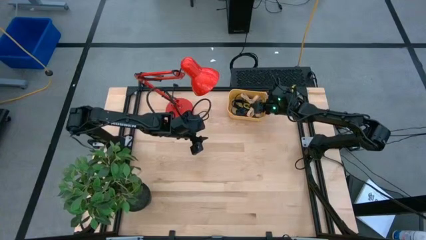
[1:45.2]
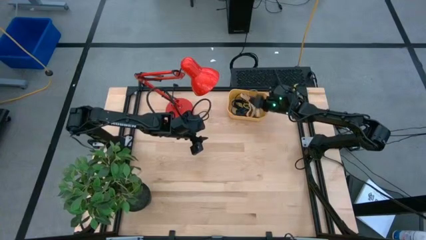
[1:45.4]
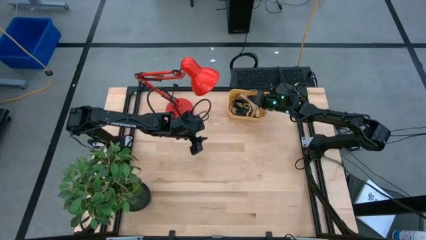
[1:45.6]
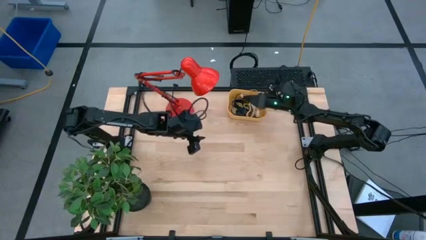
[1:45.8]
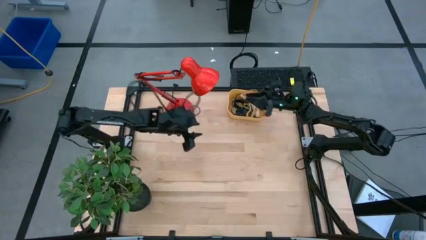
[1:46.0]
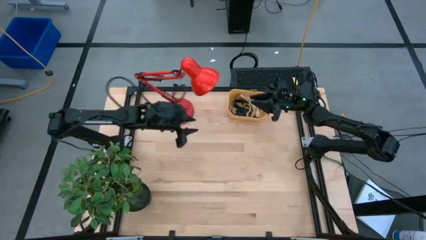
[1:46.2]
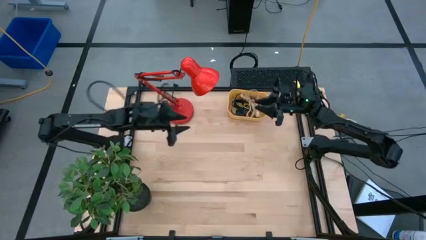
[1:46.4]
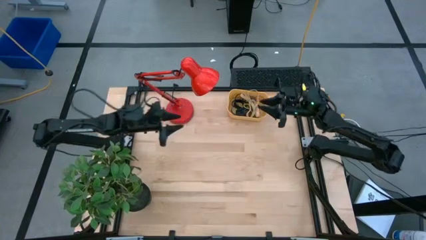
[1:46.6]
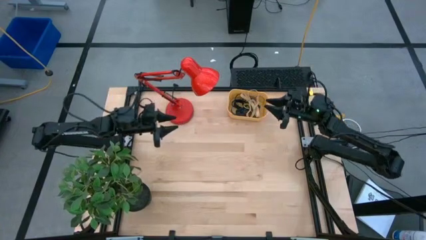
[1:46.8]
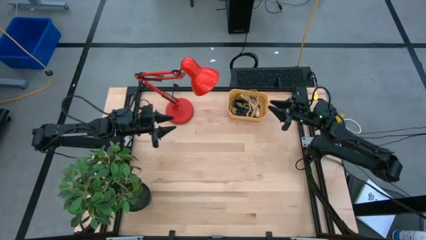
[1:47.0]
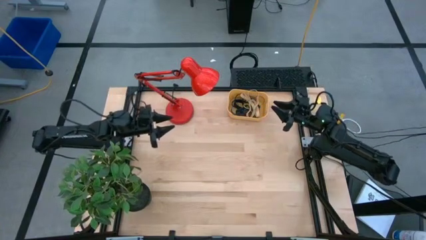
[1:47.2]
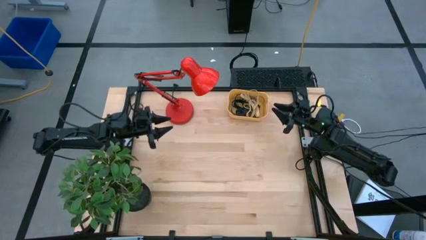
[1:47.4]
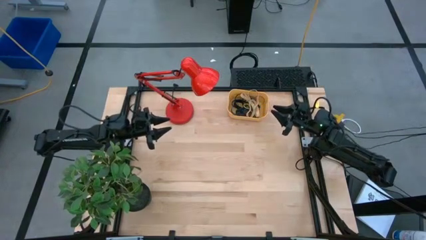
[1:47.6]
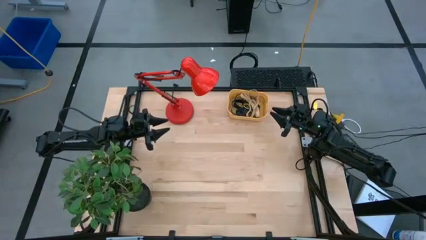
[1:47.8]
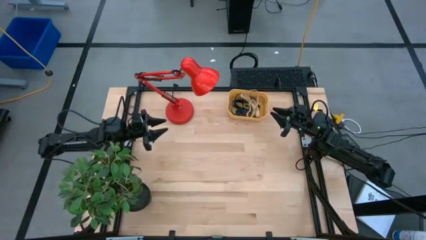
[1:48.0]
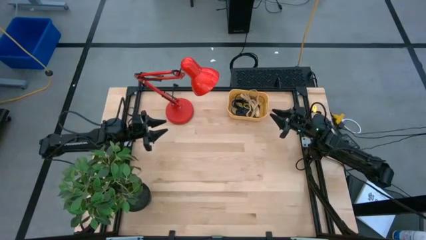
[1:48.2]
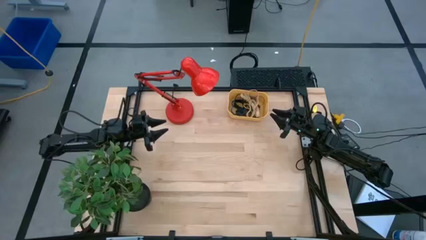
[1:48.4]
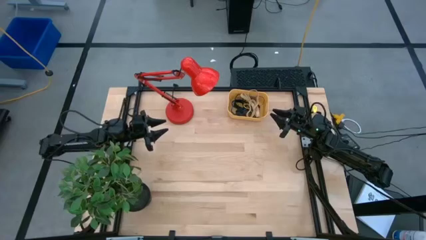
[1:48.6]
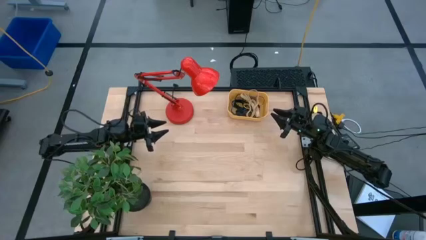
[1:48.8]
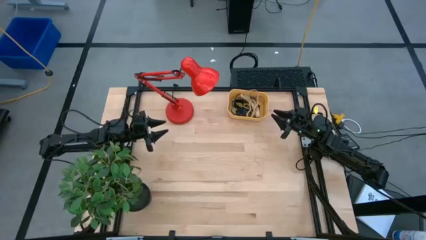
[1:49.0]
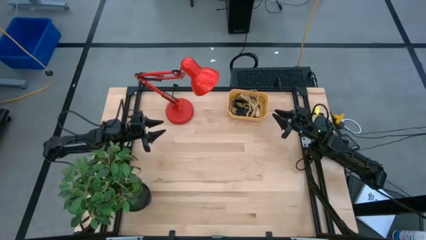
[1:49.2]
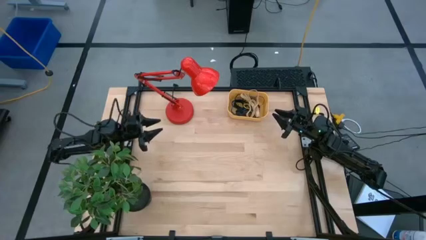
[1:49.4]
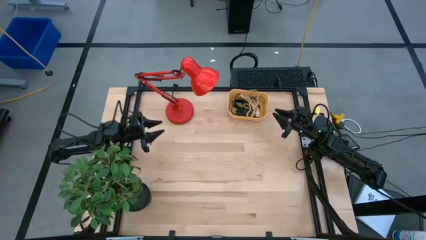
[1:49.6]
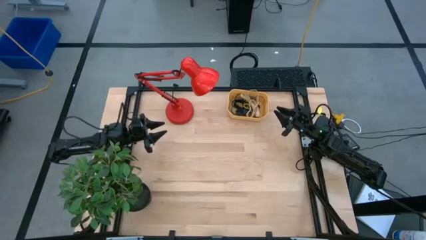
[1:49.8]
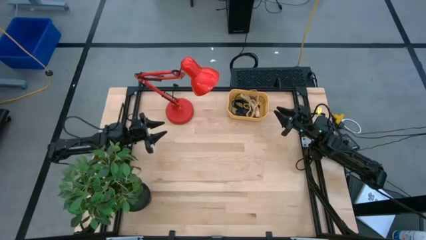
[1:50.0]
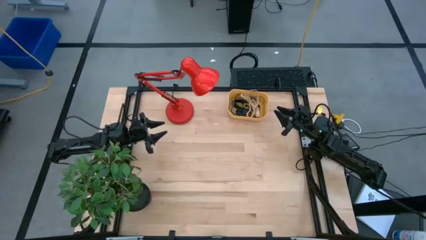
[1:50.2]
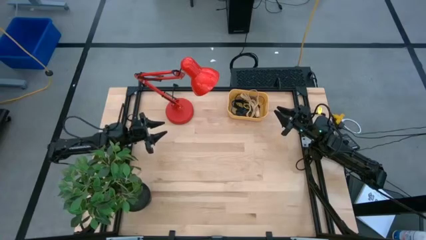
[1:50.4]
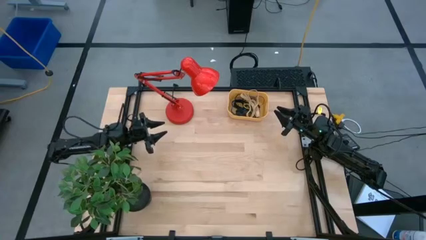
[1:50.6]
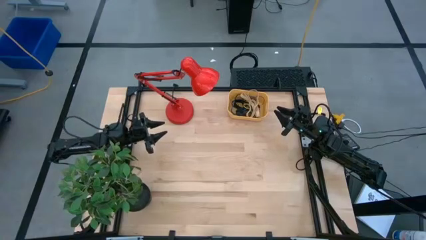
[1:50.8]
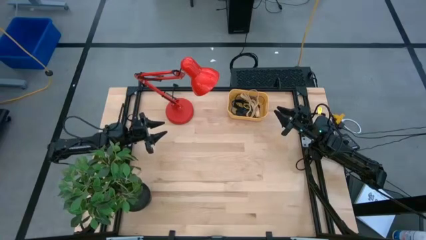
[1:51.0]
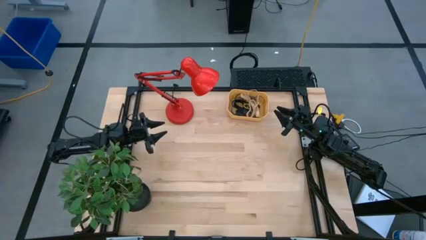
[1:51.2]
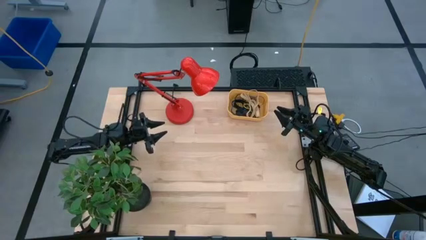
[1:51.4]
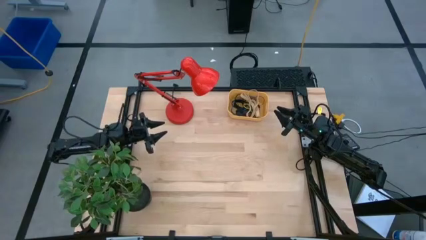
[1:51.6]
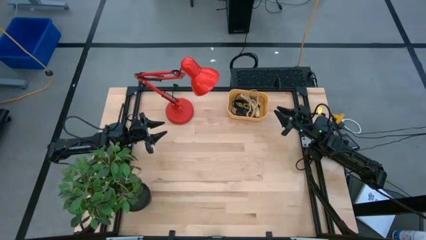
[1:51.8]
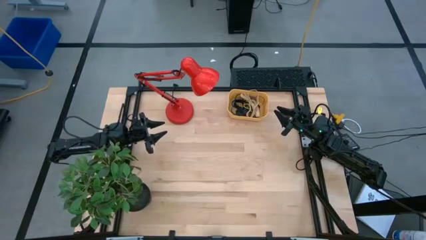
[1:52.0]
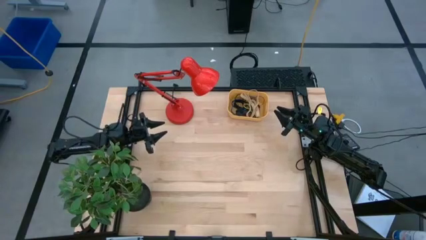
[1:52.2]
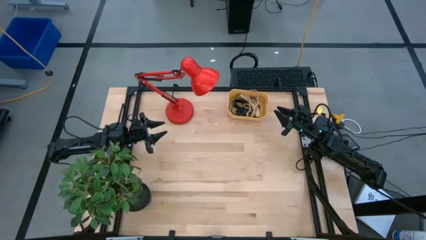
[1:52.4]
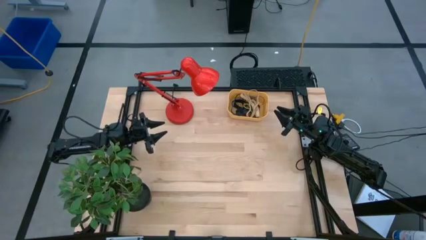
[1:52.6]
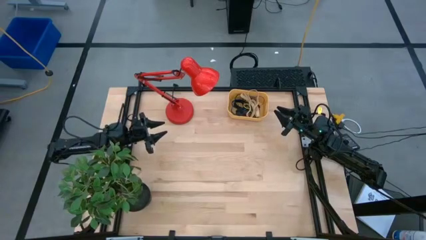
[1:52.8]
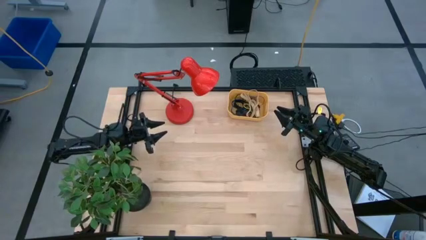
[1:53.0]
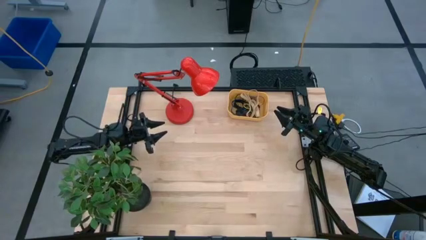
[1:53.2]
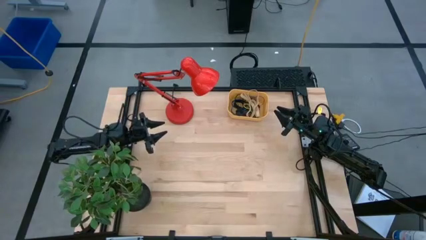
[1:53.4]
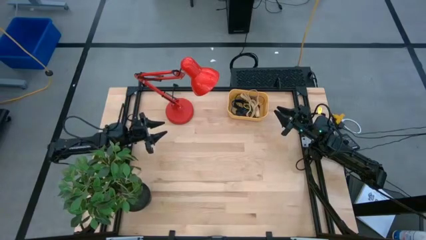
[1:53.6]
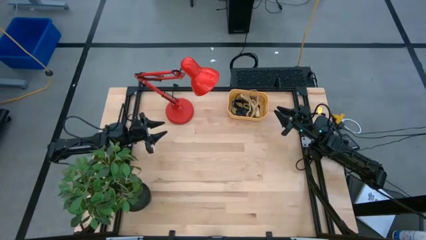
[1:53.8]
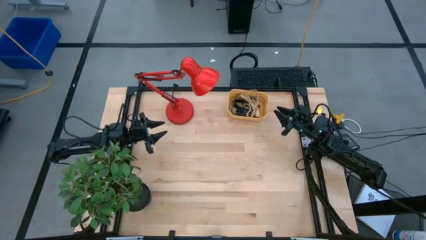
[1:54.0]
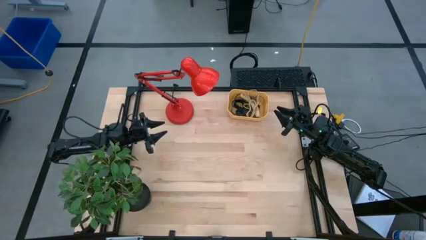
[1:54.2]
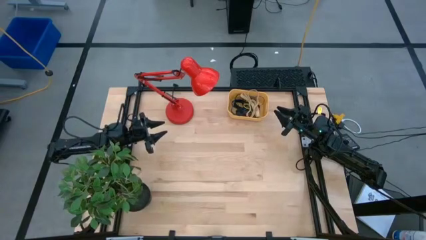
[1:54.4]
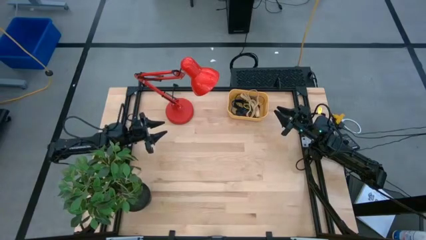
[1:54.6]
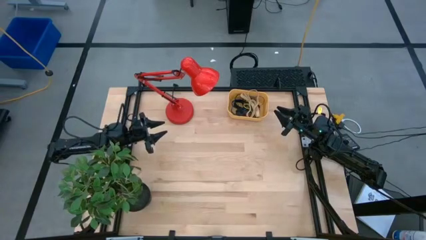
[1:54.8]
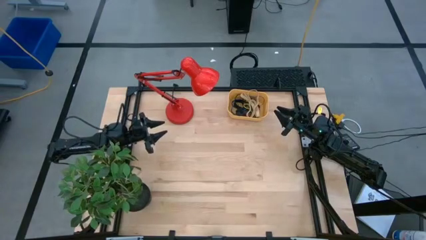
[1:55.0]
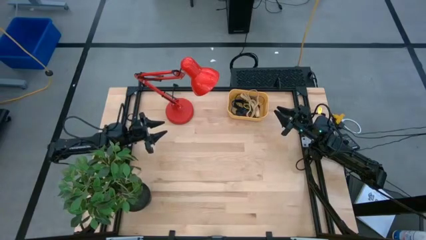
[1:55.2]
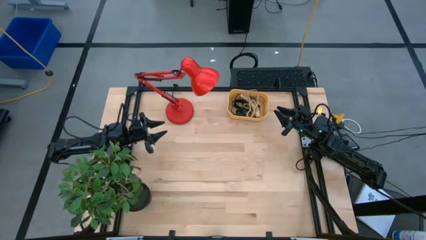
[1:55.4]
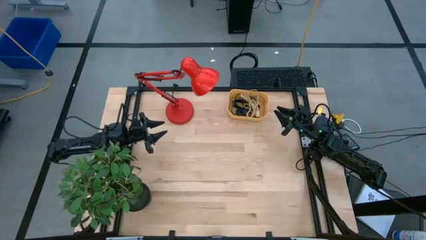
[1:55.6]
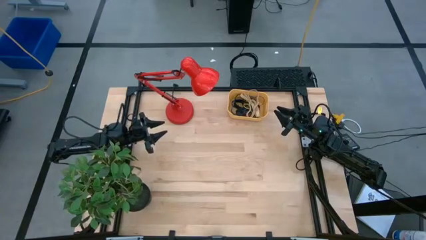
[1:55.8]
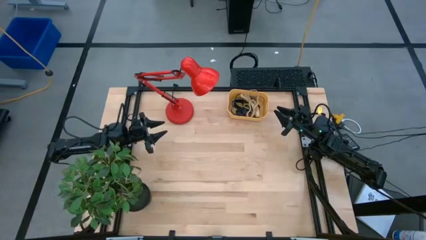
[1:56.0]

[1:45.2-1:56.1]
Task: Pick and place rubber bands into bin
Return to Home Position

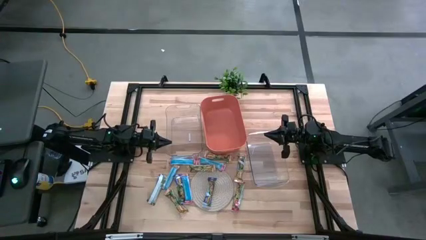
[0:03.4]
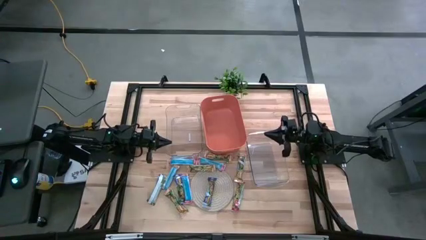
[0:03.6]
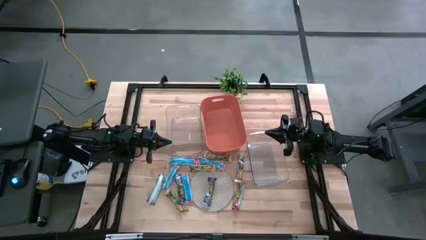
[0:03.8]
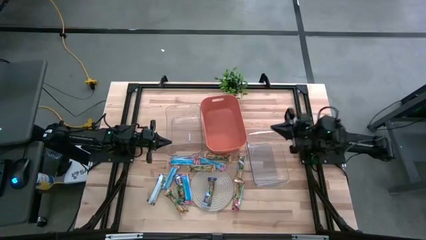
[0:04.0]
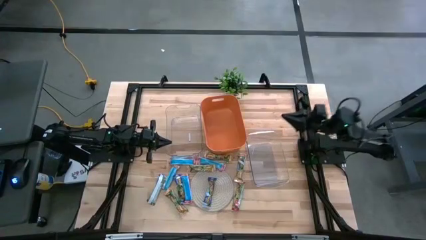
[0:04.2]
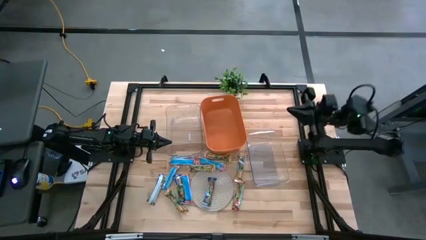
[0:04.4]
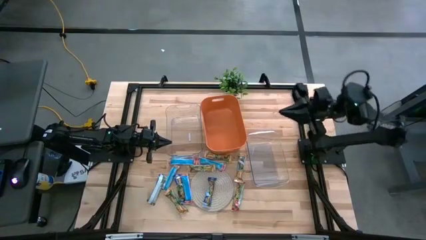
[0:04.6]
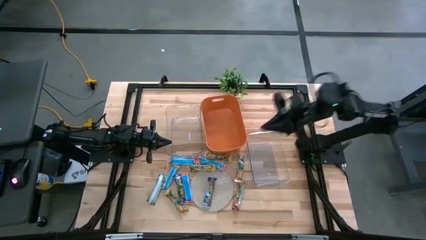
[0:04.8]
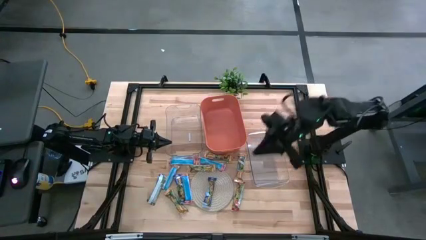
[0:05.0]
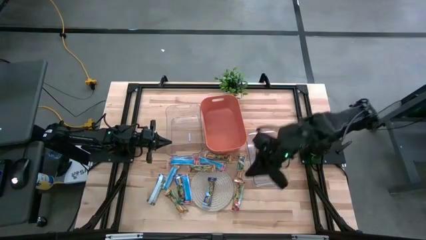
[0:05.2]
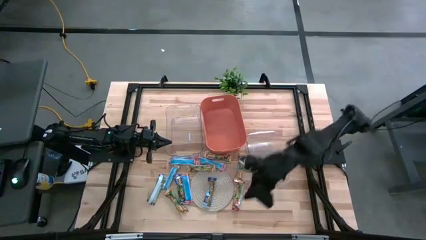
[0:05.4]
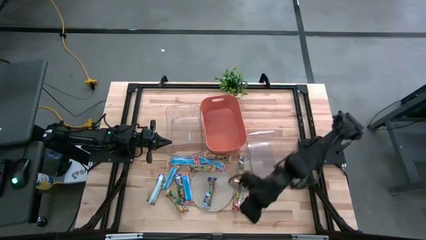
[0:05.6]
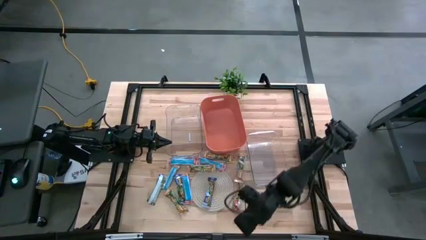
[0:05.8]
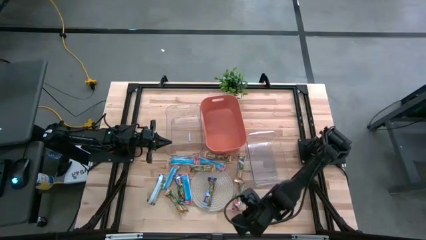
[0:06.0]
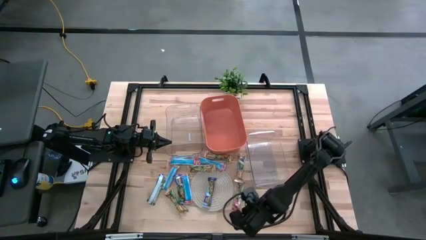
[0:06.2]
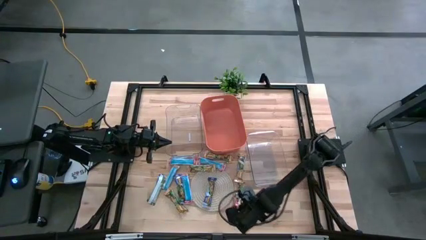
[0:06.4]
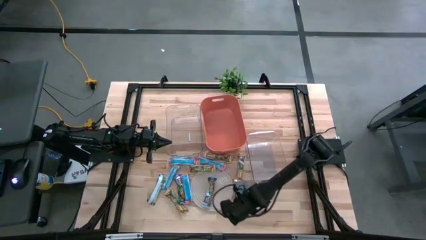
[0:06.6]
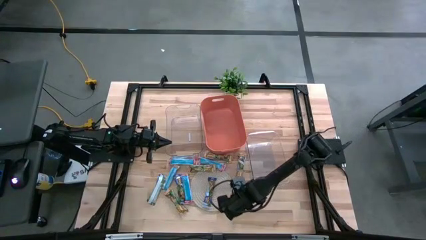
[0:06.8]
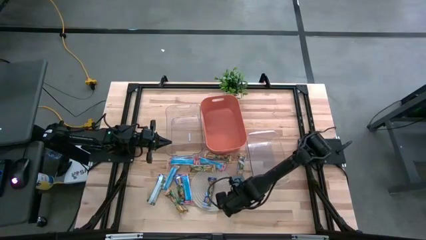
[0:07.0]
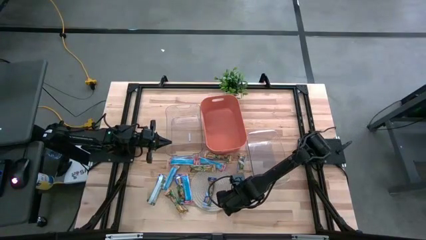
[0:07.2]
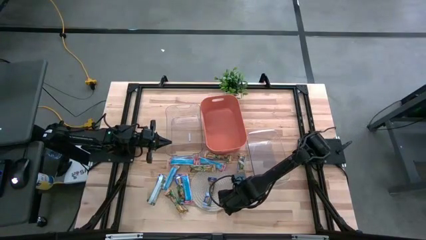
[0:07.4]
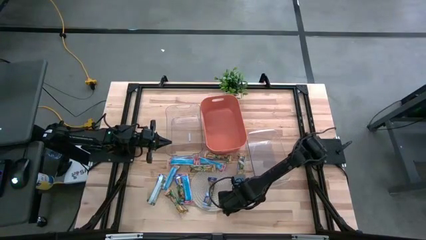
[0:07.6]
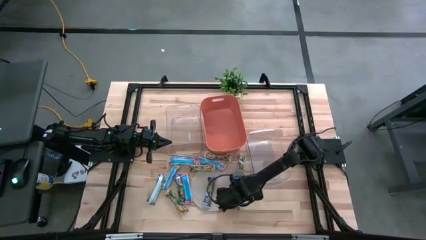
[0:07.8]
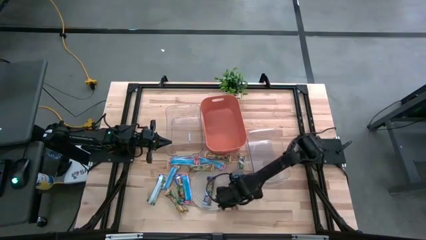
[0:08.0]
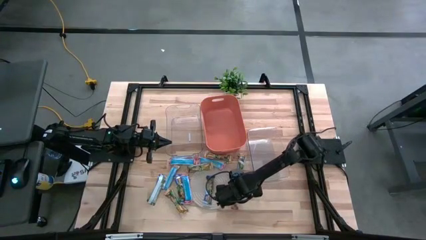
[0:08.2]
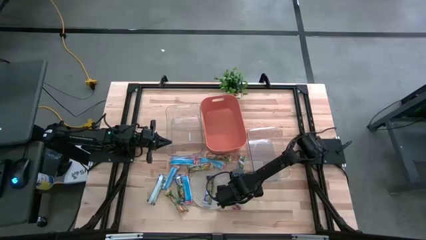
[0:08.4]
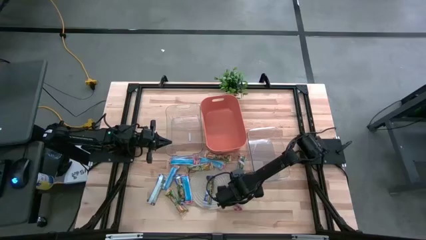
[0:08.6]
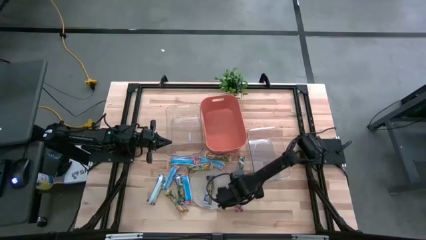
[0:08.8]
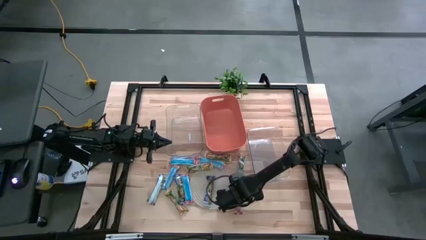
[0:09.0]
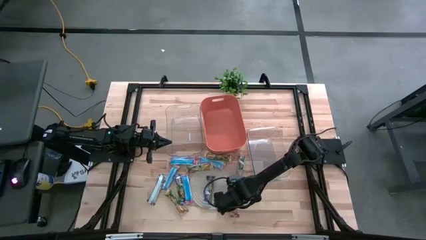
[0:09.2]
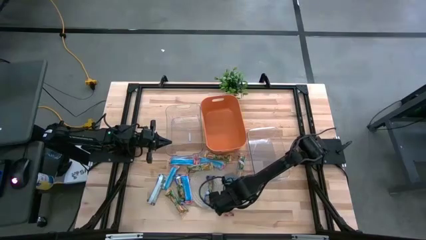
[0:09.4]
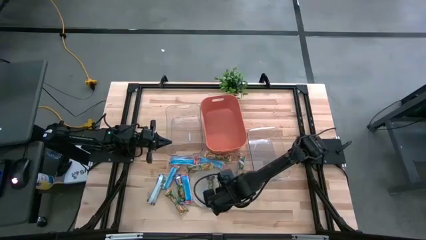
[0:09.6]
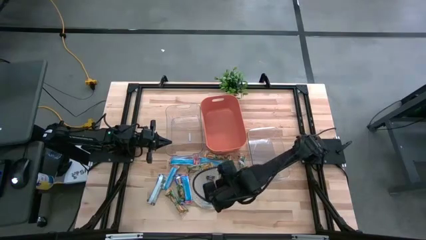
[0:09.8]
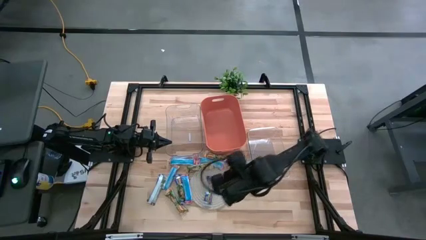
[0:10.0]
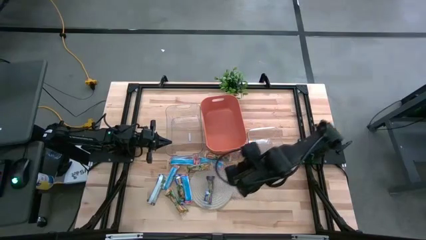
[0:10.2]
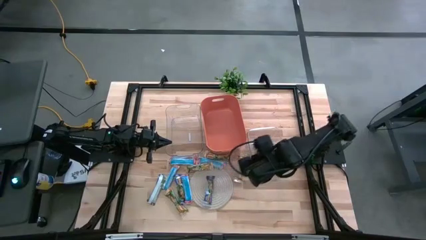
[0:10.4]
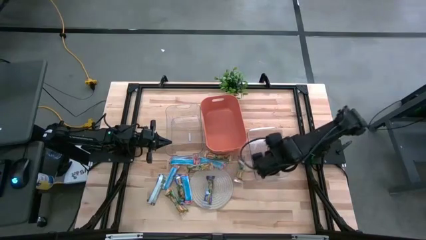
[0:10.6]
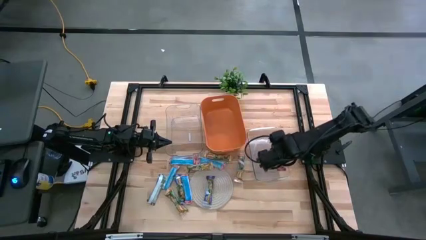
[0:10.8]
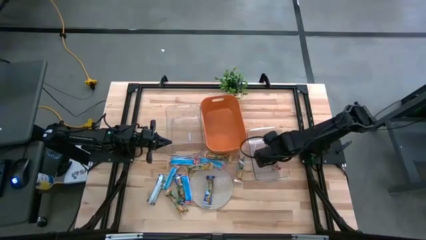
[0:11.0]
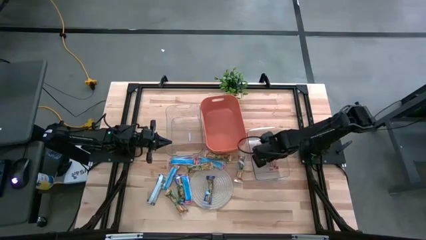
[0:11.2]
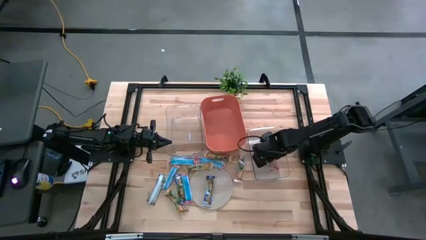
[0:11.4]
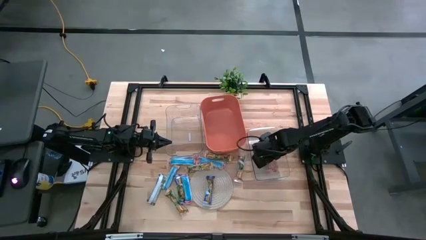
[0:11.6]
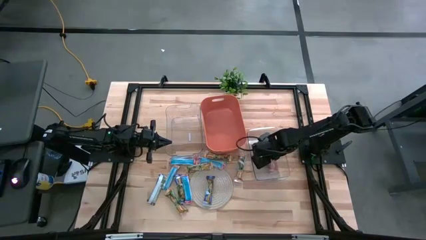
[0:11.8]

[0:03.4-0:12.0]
Task: Pick and place Granola Bars by type
Put the red granola bar into the right transparent bin
